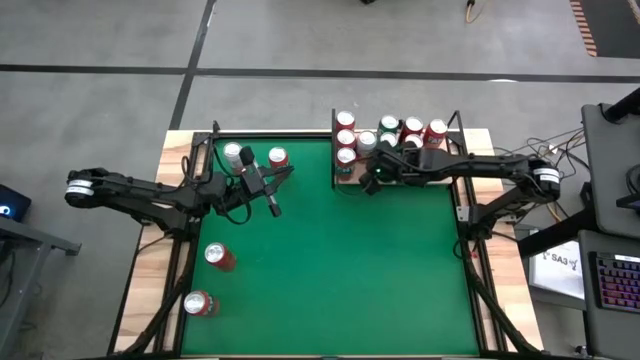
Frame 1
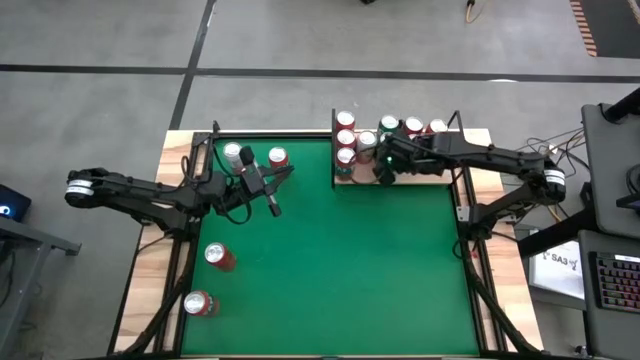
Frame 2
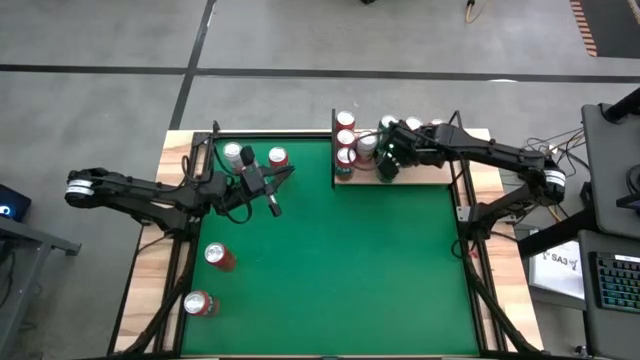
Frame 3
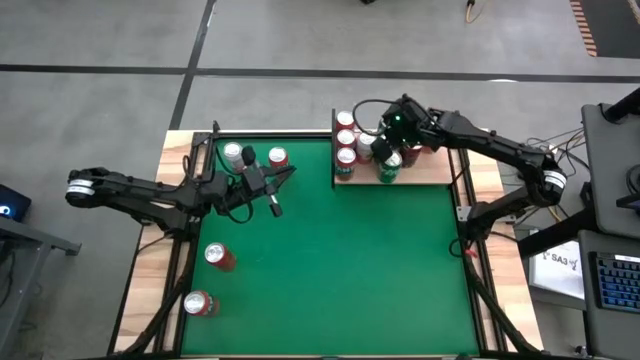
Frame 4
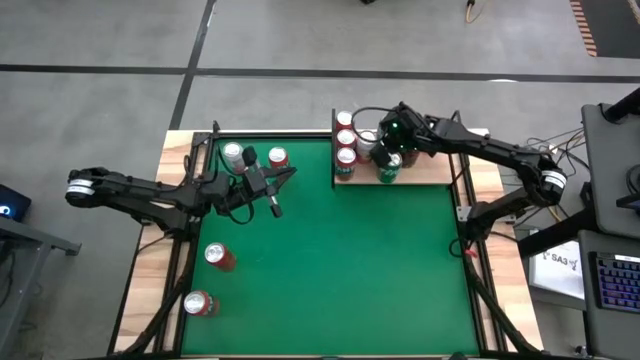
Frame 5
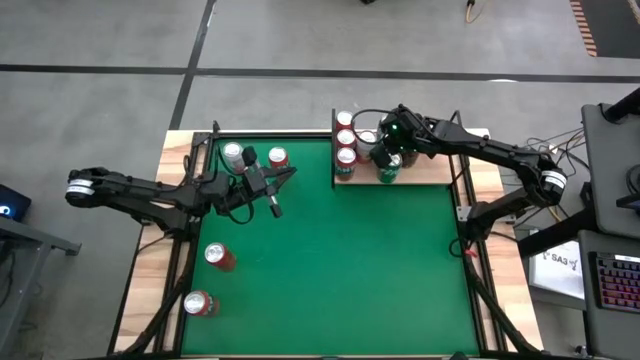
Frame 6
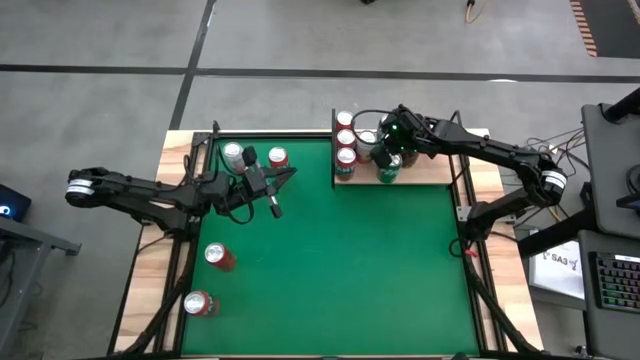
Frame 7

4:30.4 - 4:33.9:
Task: Place canned beverage on shelf
Adjust the green soda cans on the shelf

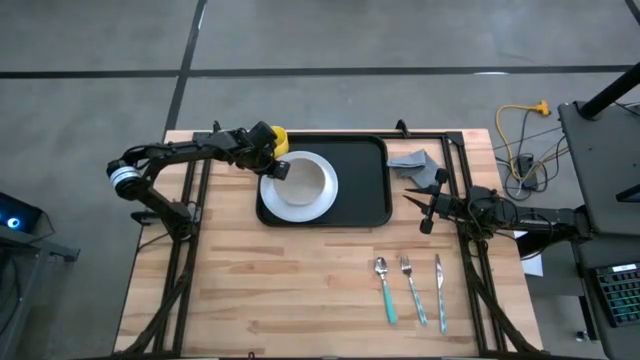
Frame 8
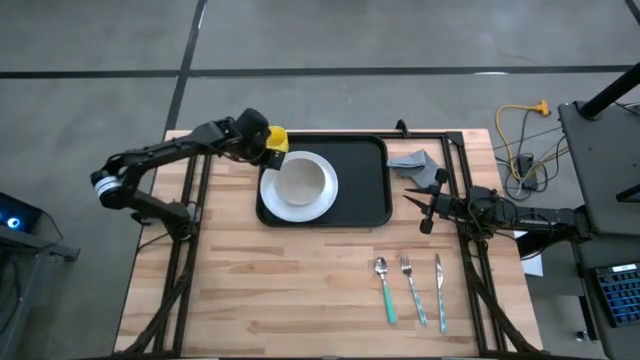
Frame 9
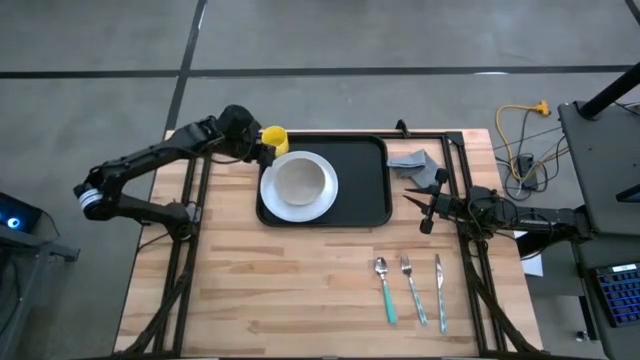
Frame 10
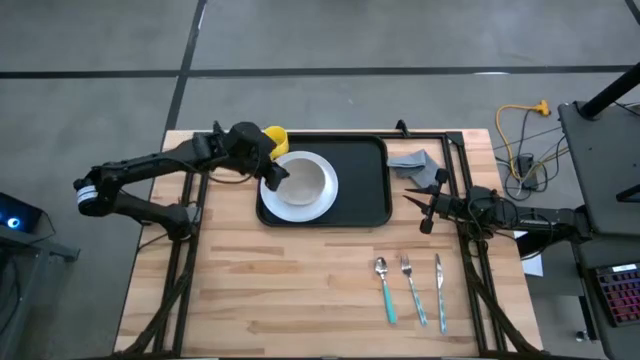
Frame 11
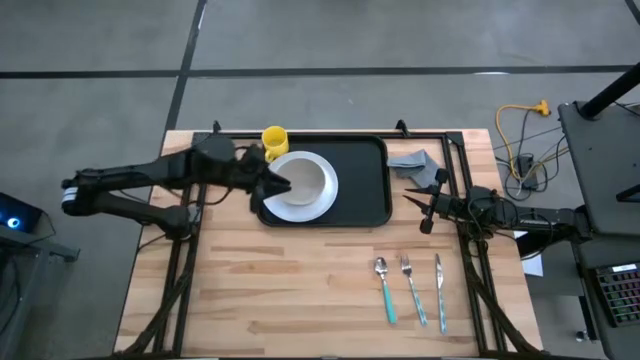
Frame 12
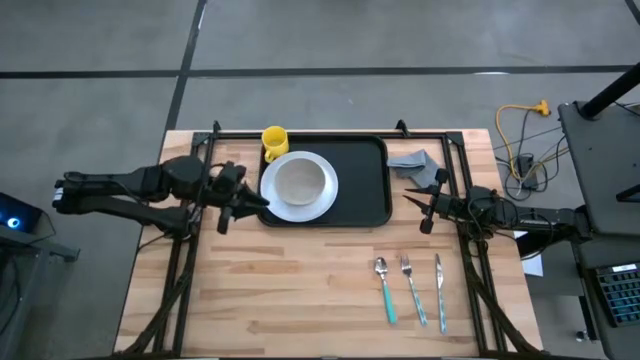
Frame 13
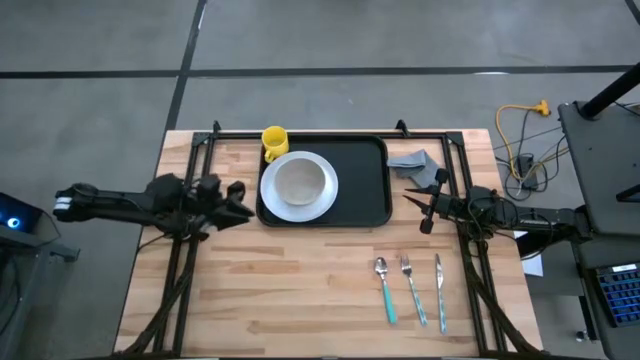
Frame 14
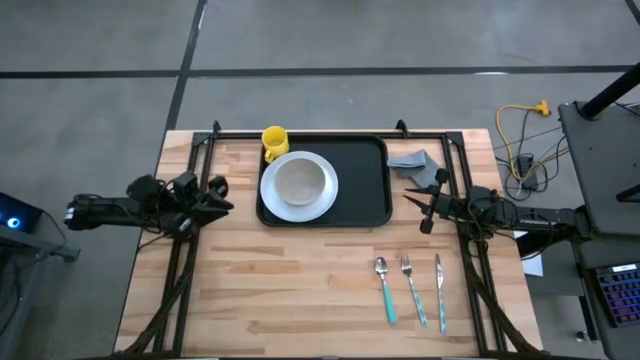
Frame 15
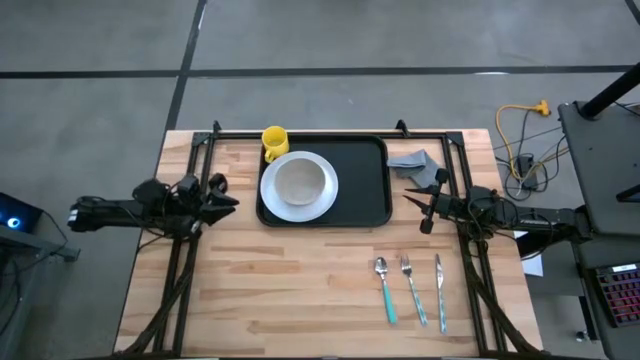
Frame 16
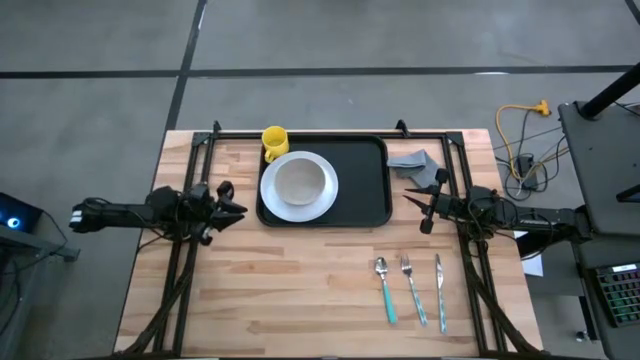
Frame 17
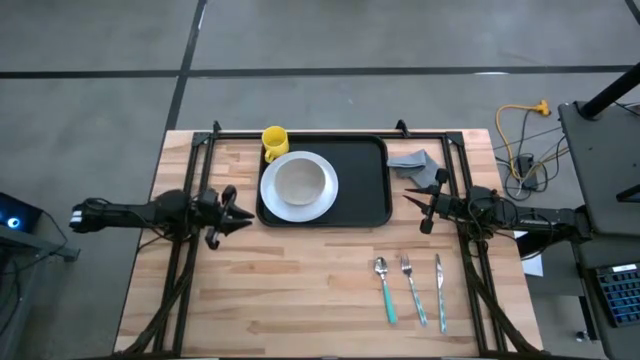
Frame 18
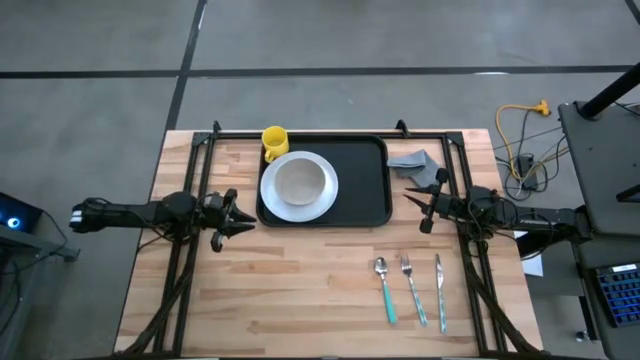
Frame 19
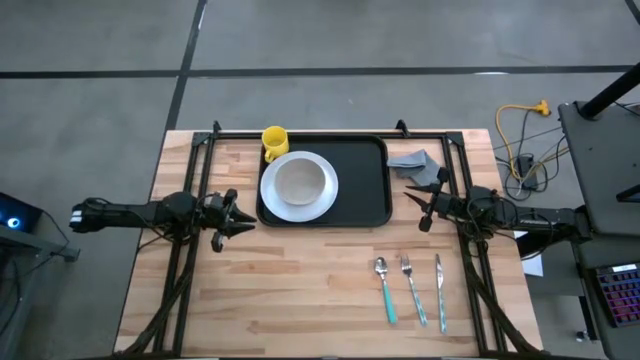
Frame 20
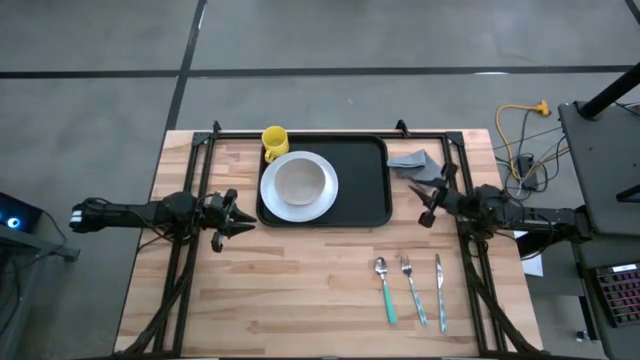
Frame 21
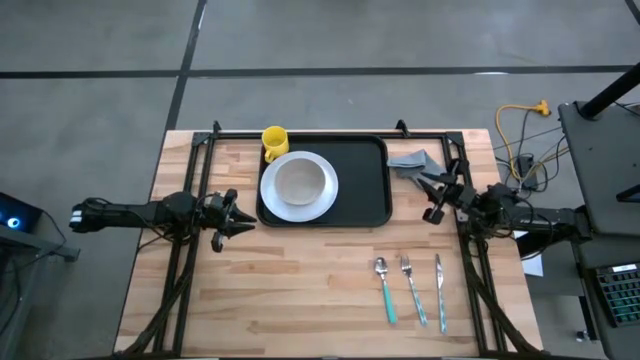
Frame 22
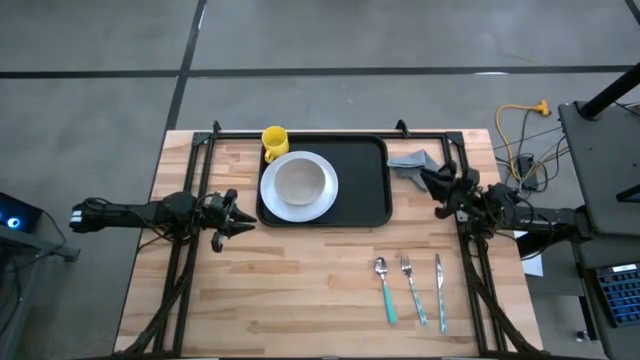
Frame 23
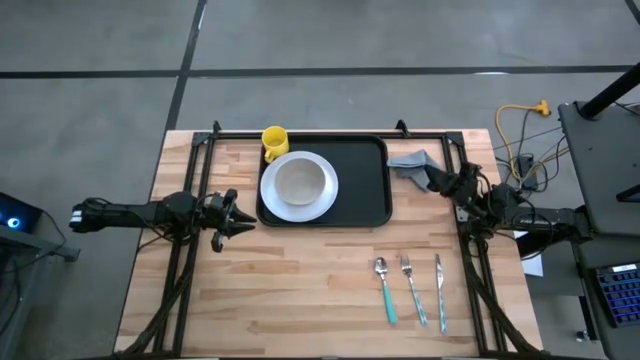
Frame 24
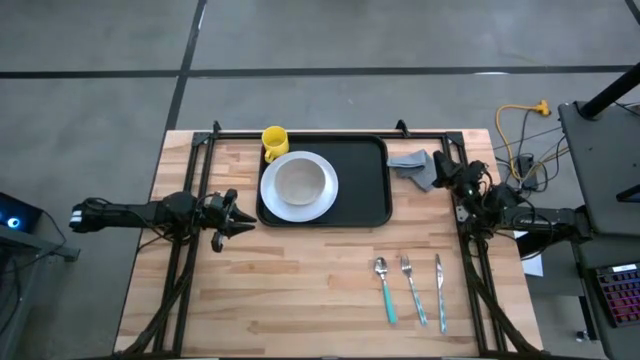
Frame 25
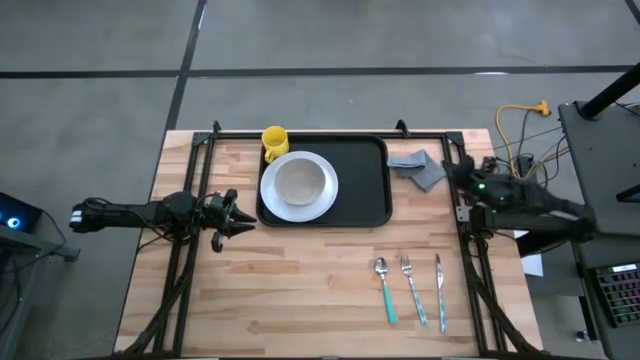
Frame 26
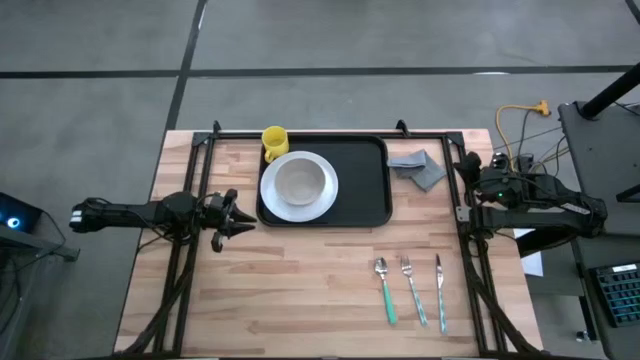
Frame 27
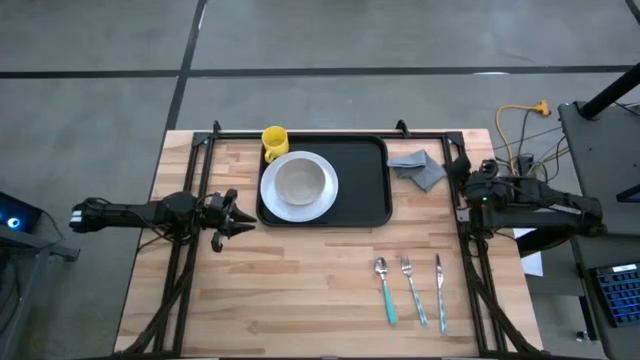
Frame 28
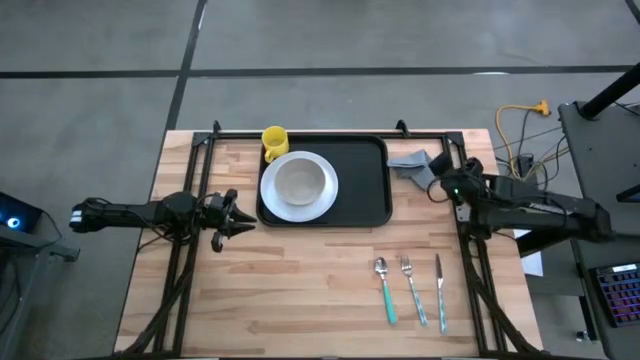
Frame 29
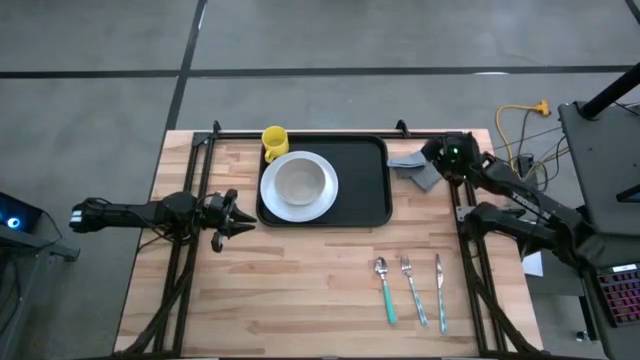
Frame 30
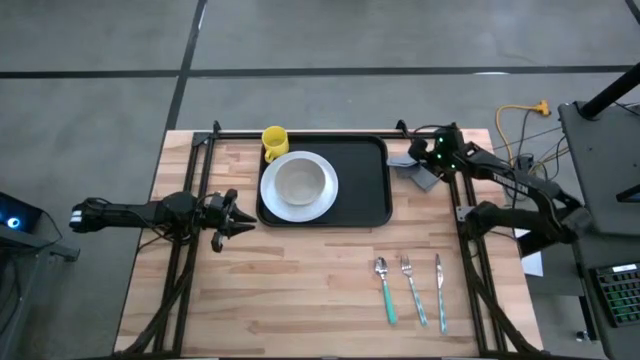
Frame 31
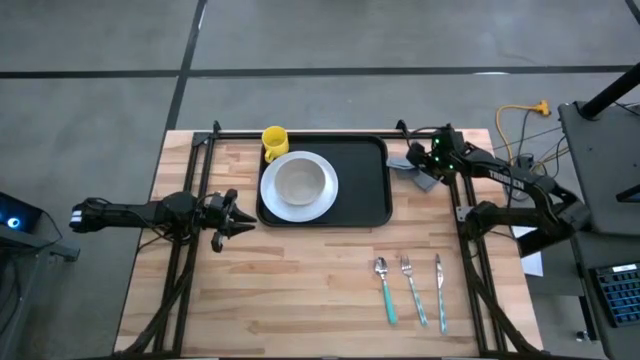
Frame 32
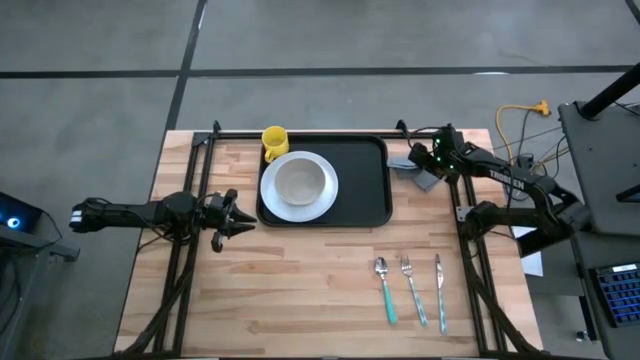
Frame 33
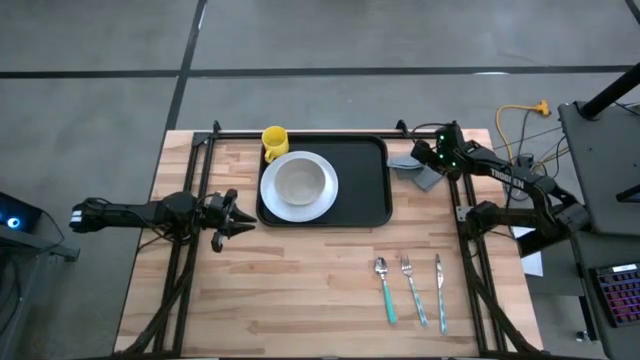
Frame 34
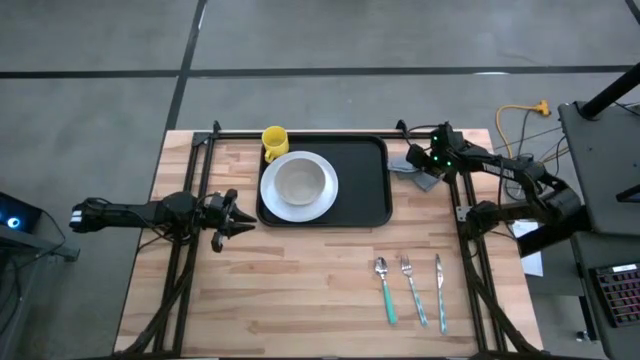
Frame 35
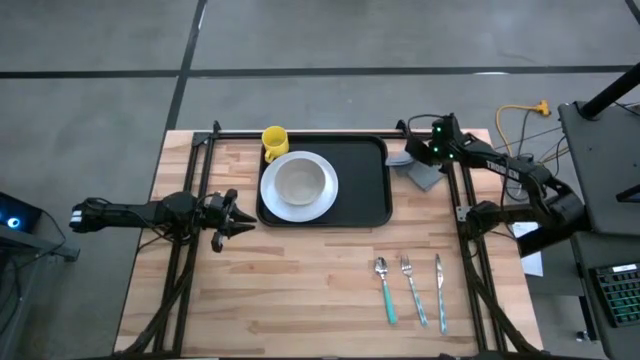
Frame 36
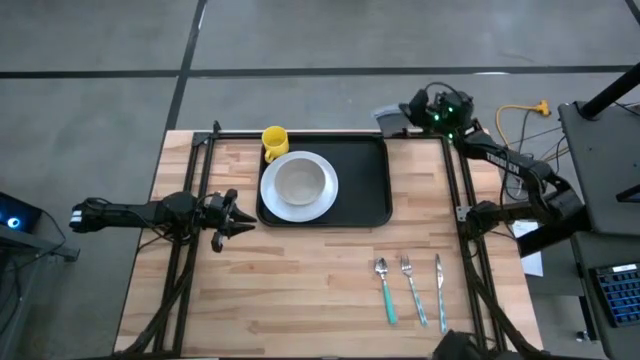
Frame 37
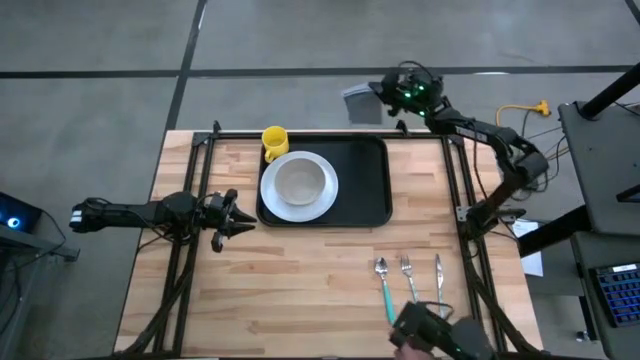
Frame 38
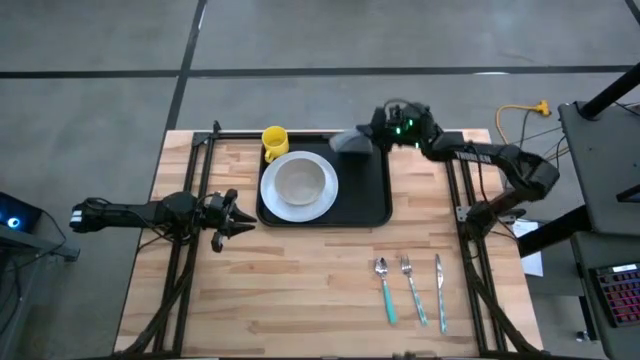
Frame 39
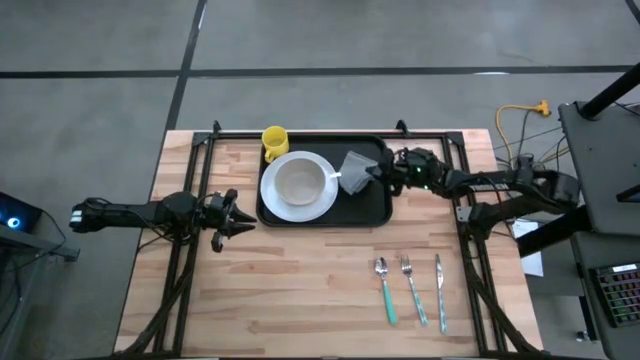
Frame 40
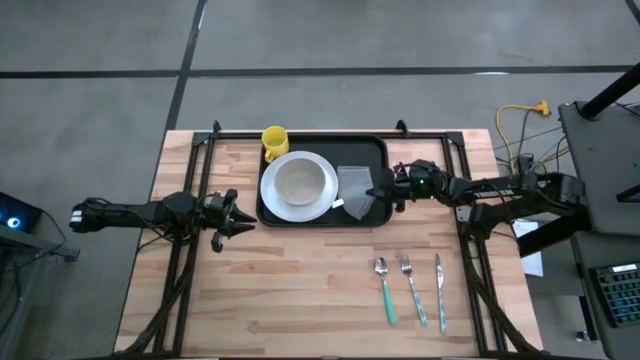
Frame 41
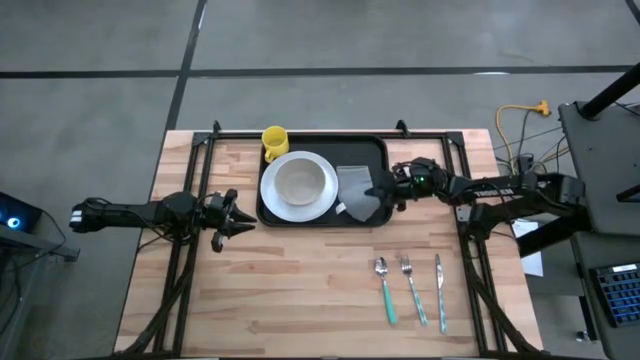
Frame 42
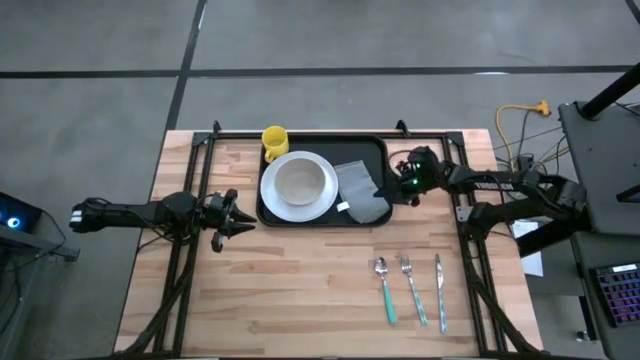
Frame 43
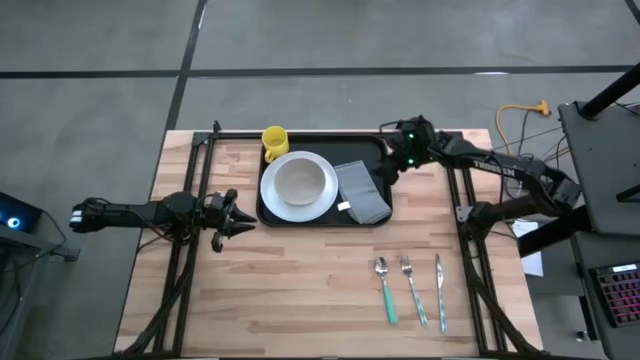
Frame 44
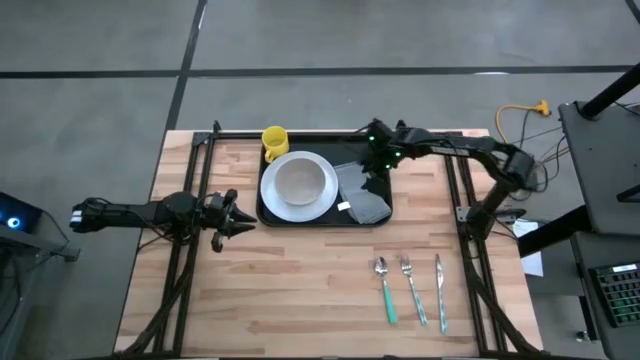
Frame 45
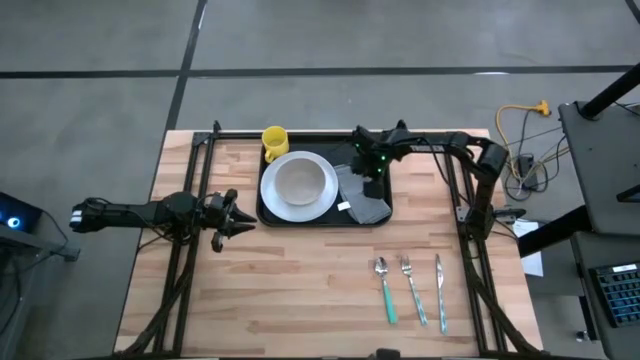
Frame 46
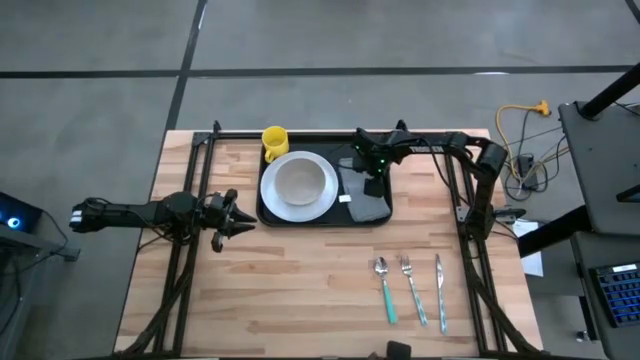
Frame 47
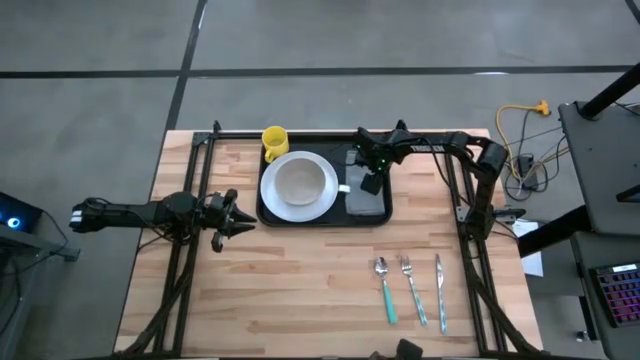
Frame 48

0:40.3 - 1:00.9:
Task: Set up tray
Put the gray napkin on the black serving tray to the right of the white plate
